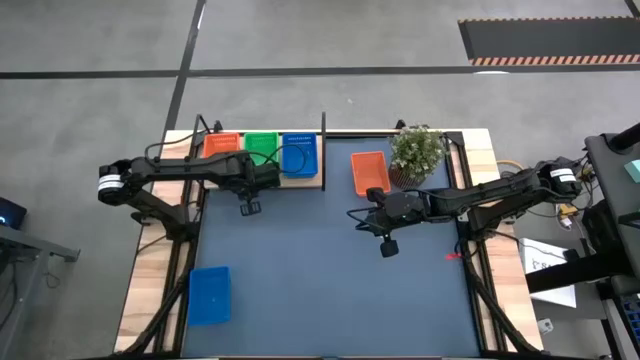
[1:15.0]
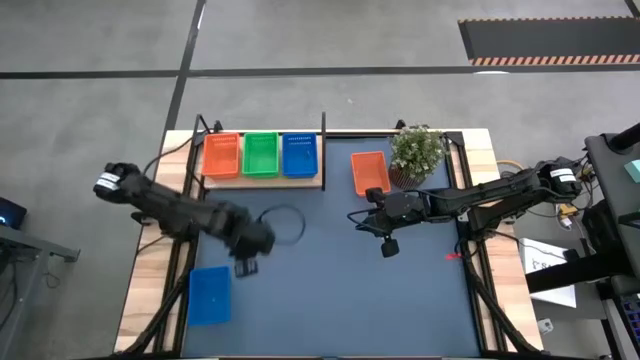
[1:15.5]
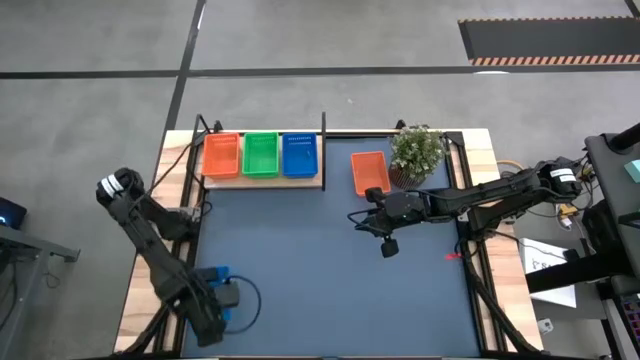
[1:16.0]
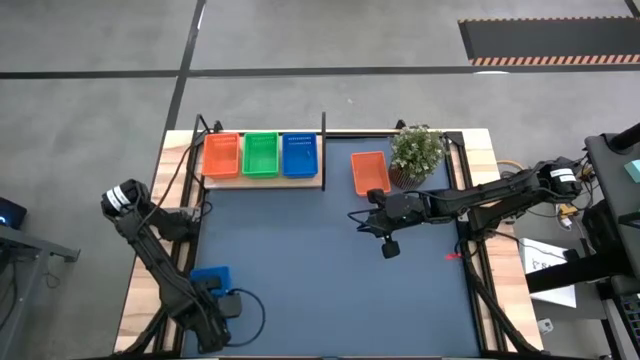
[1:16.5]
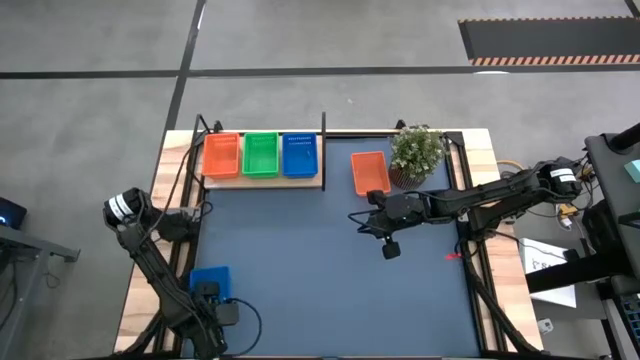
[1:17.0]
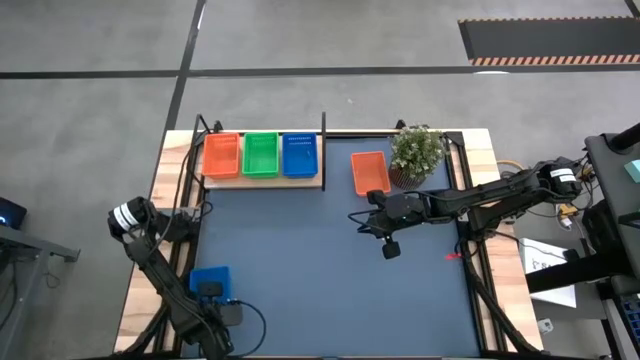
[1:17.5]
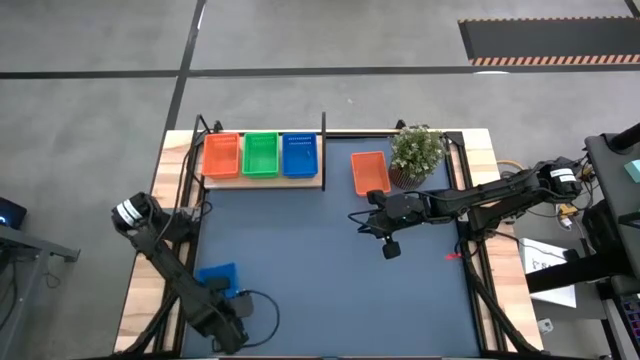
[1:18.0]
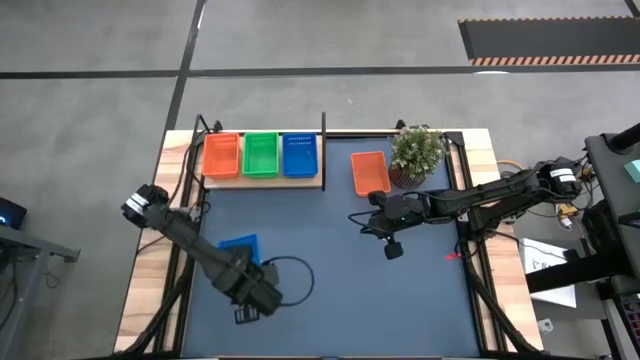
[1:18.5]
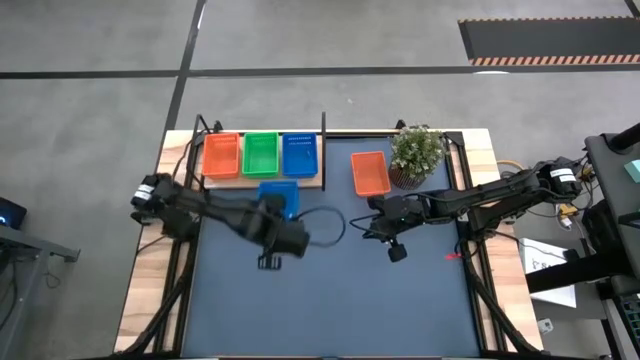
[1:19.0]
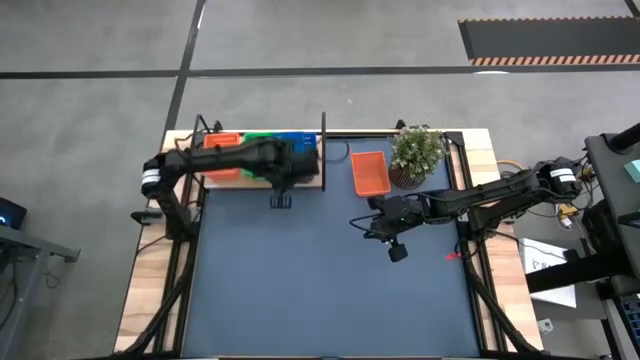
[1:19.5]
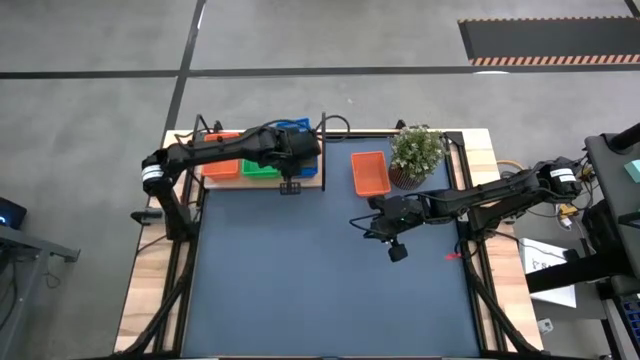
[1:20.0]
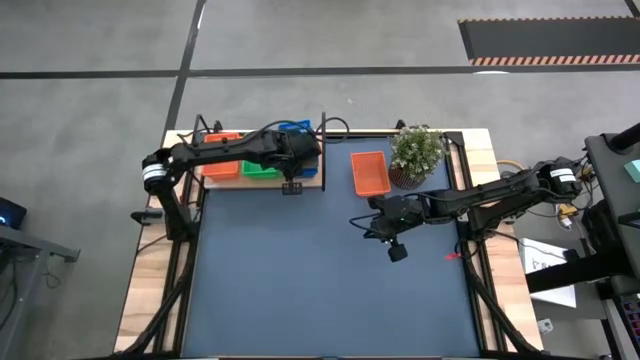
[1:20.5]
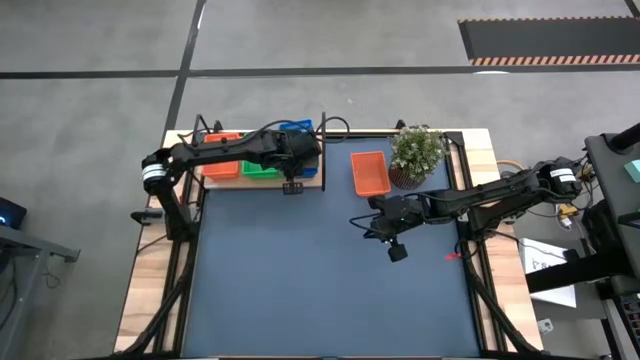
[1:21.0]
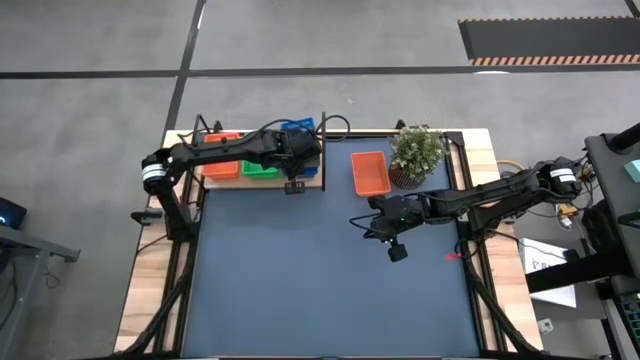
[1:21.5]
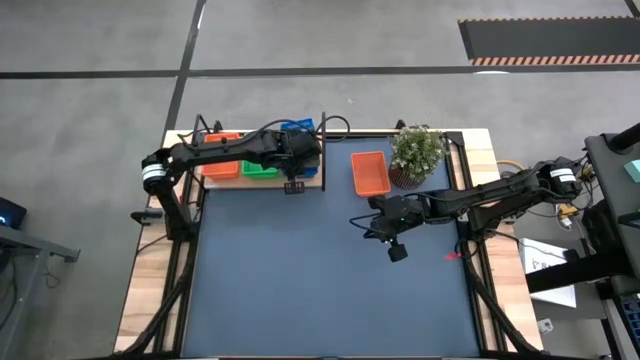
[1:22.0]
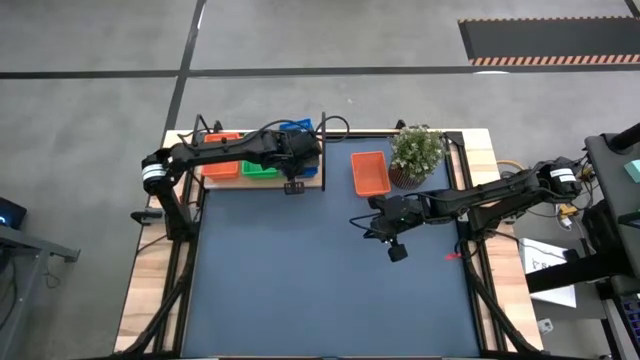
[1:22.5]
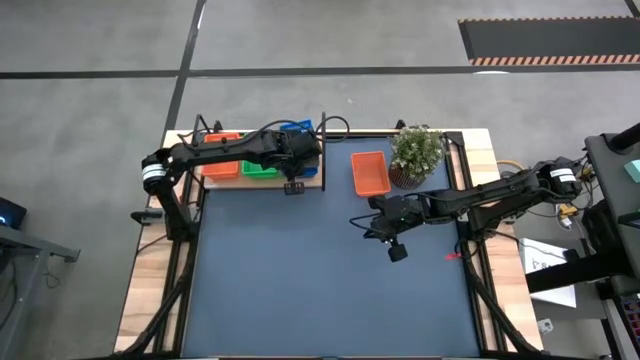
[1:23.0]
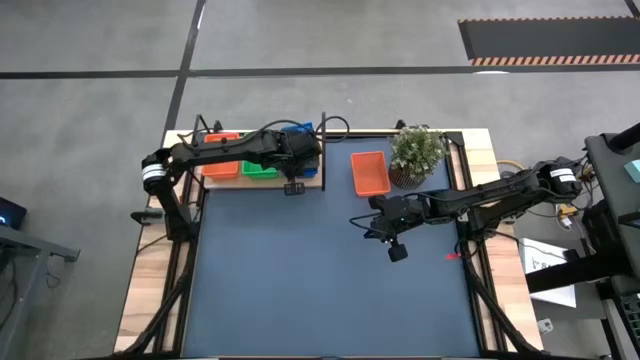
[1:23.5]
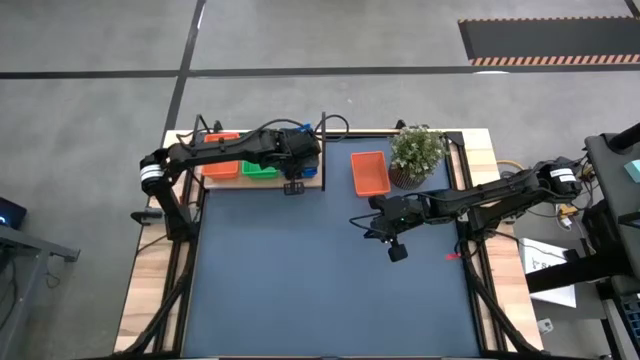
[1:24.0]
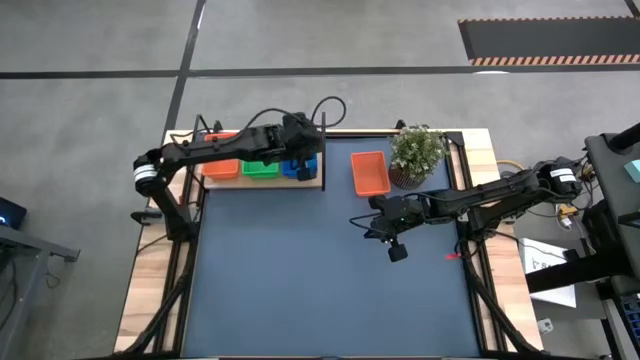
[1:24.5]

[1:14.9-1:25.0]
Task: Stack baskets on shelf by color
Stack the blue bin on top of the stacked blue bins on the shelf

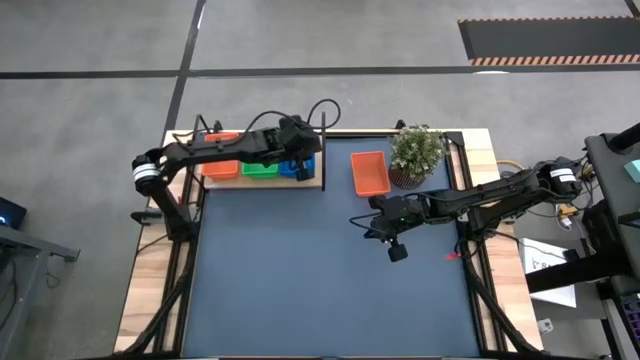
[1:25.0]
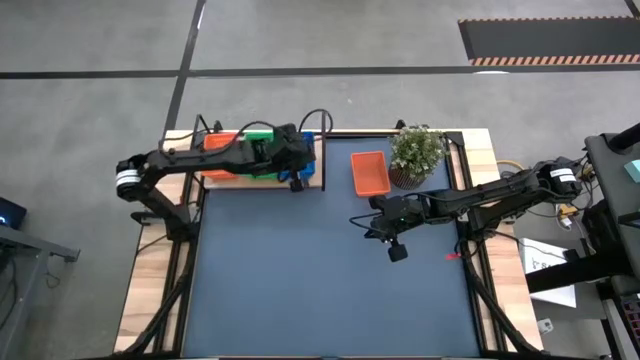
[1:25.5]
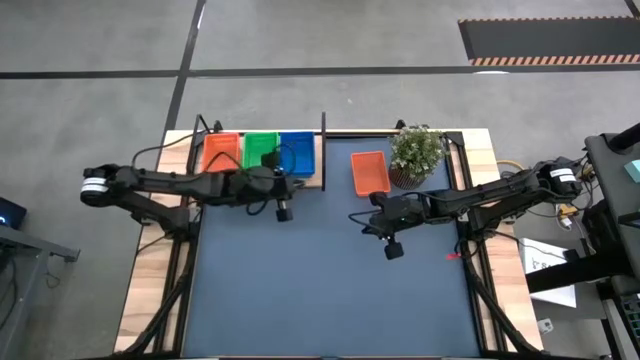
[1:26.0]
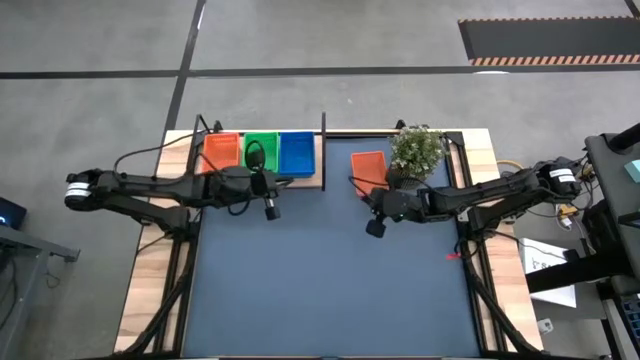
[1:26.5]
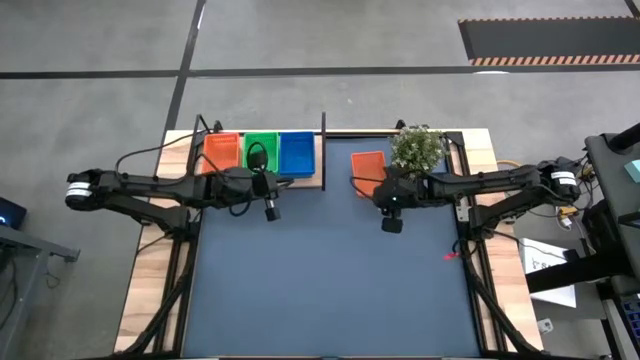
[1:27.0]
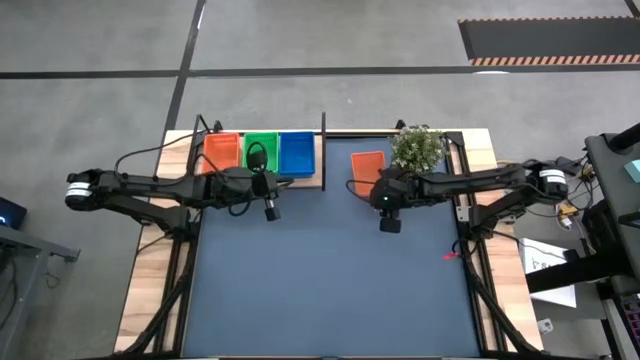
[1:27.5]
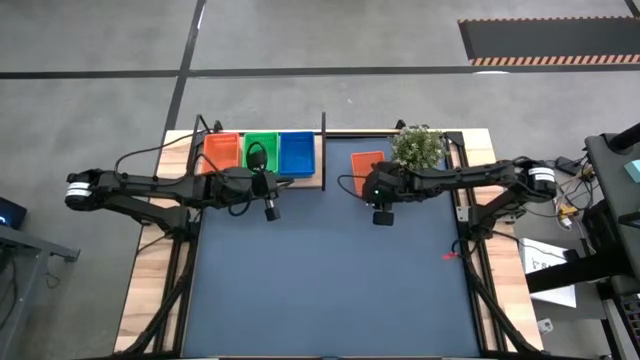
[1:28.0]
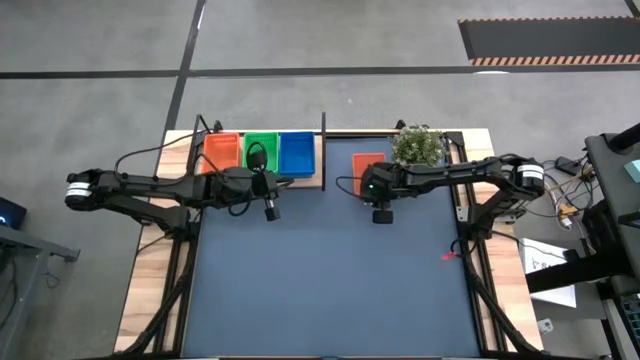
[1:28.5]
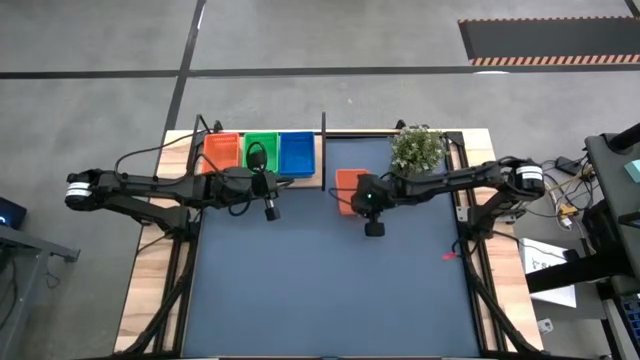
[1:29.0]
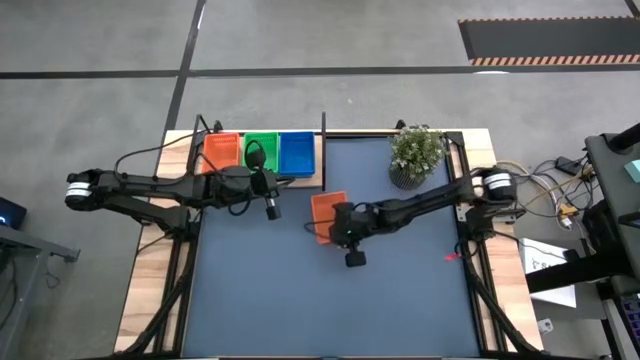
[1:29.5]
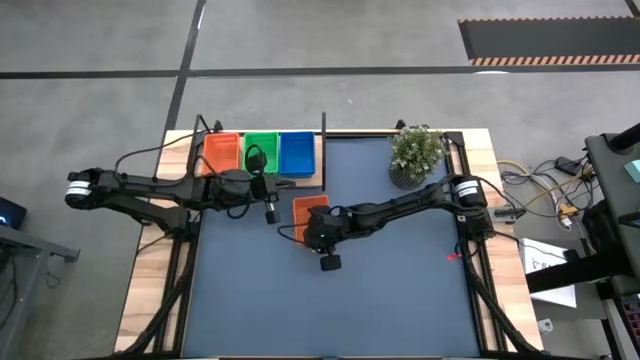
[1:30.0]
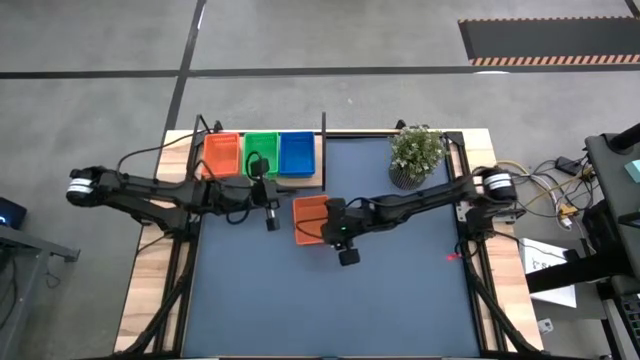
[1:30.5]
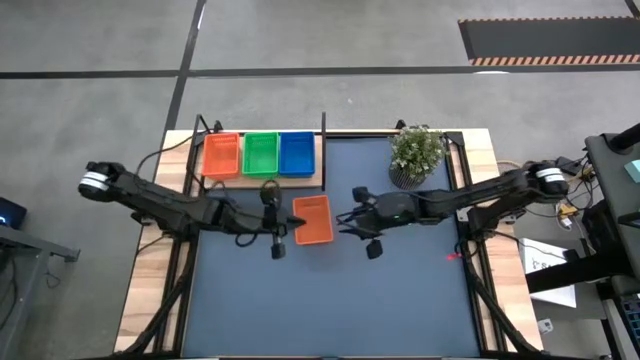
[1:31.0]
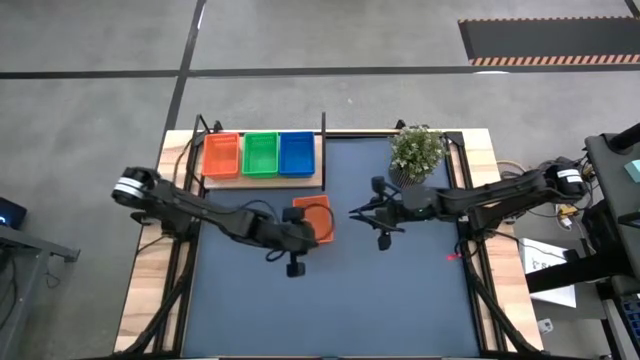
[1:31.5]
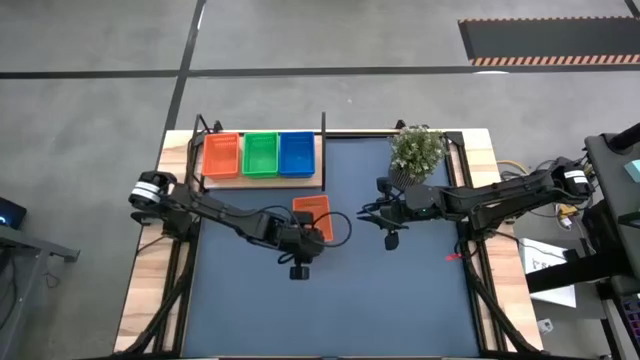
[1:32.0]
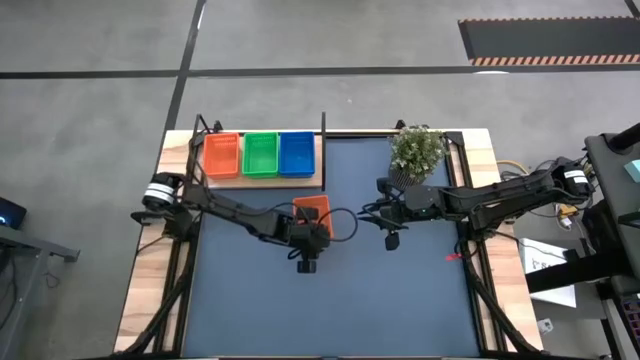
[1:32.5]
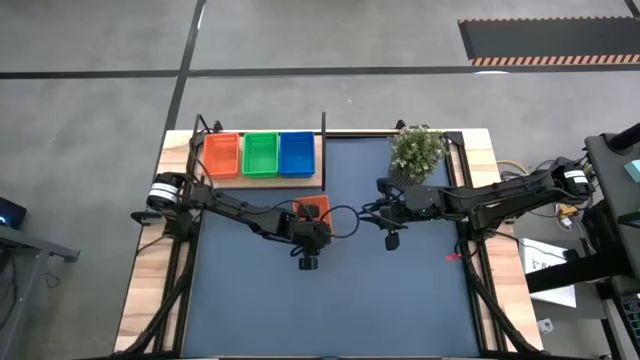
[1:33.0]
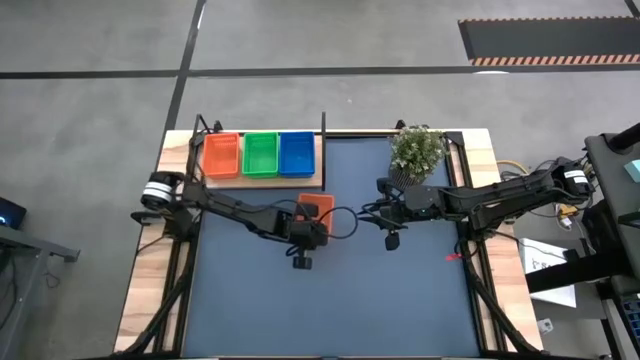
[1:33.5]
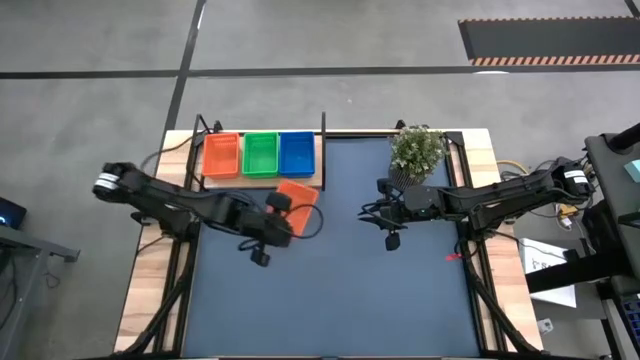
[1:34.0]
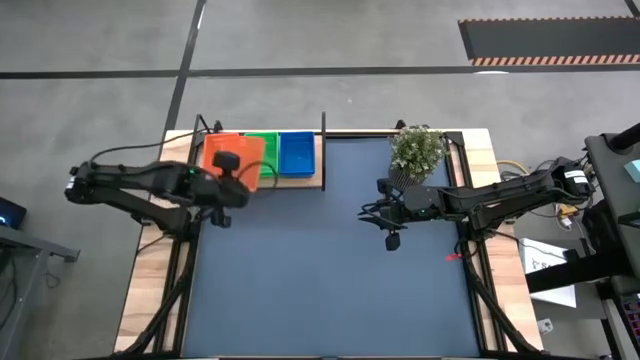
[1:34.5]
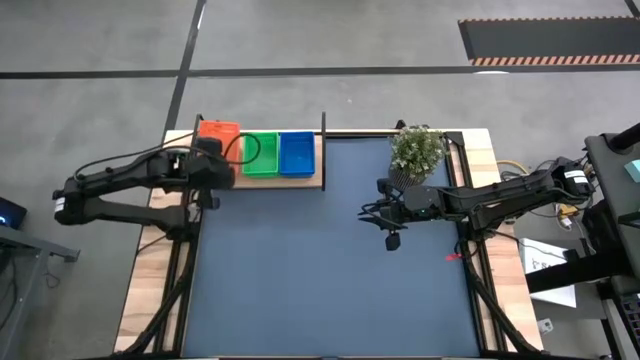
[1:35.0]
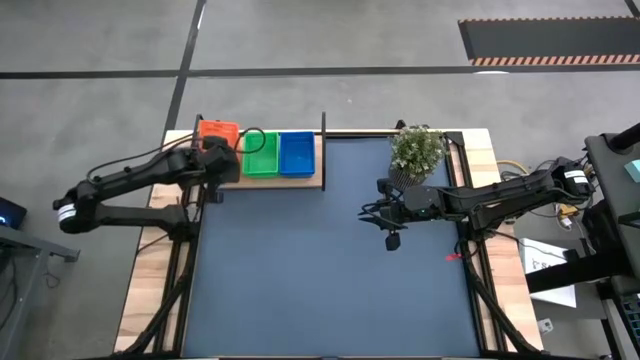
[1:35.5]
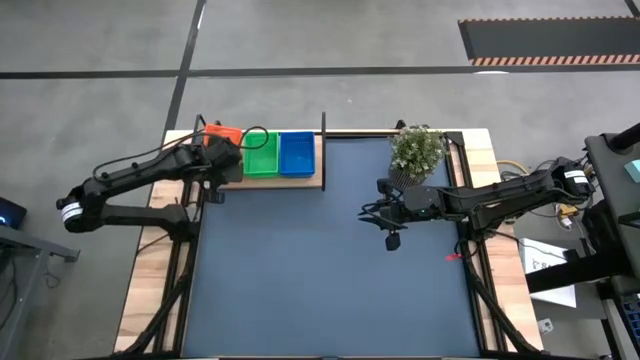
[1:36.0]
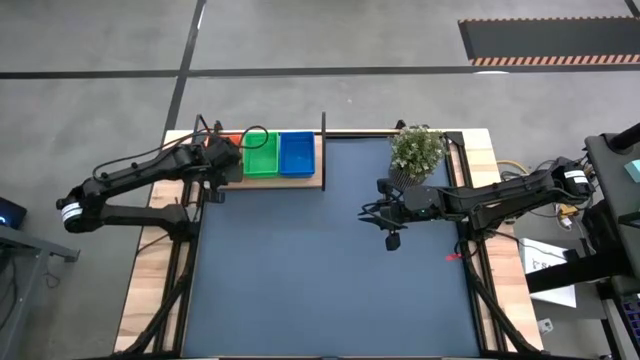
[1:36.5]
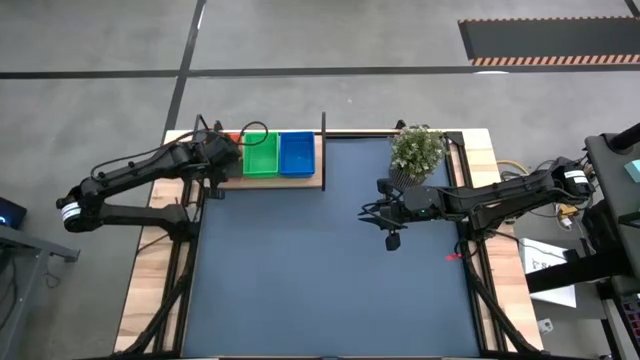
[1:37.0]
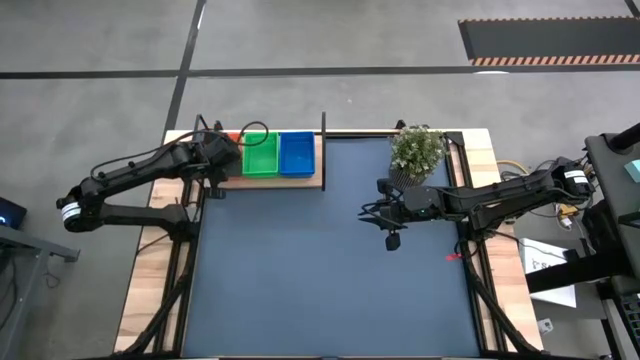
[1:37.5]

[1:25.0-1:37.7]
Stack the orange bin on top of the stacked orange bins on the shelf
